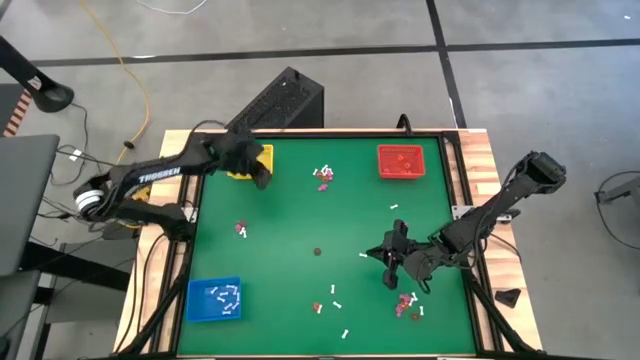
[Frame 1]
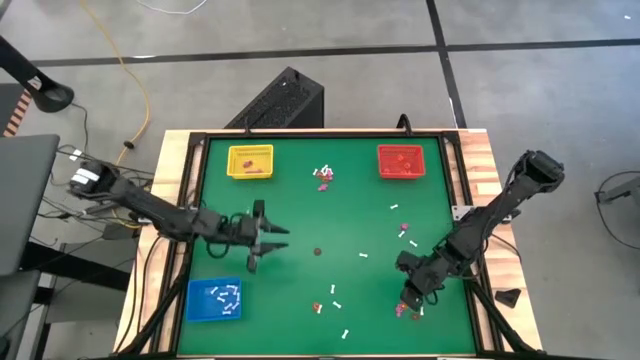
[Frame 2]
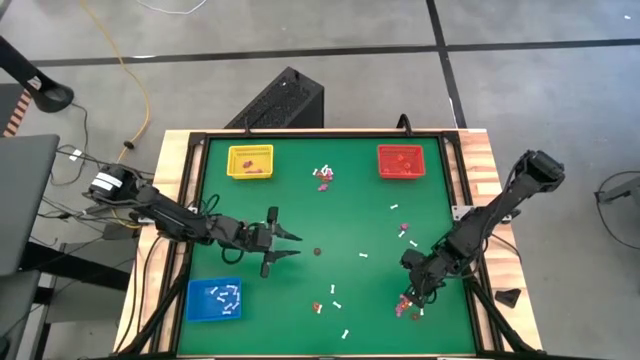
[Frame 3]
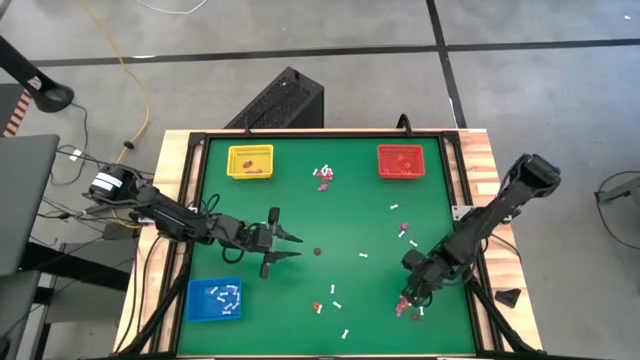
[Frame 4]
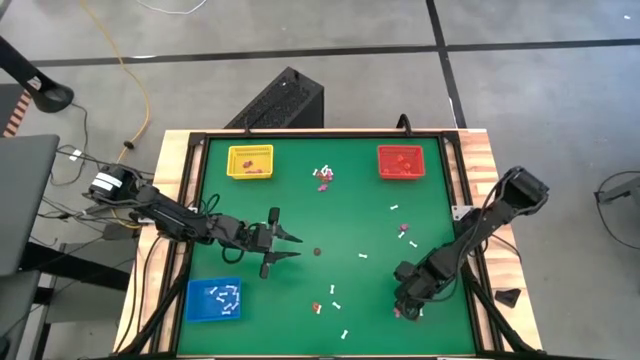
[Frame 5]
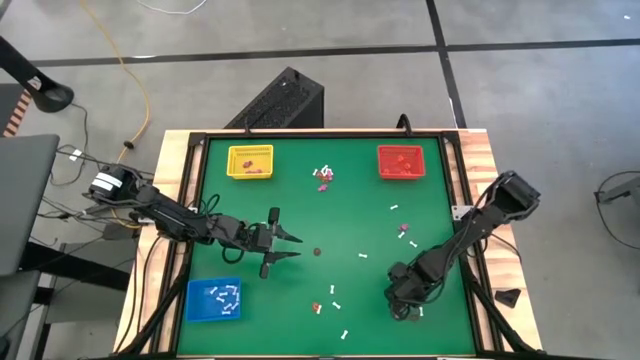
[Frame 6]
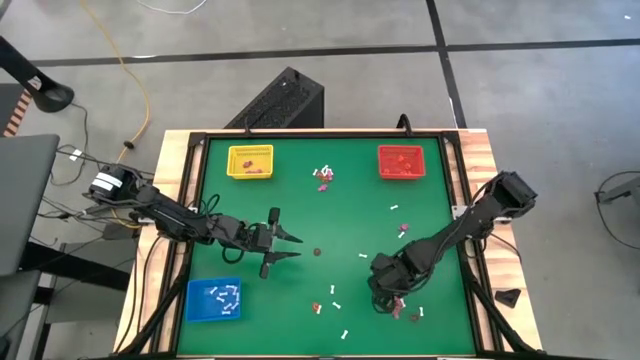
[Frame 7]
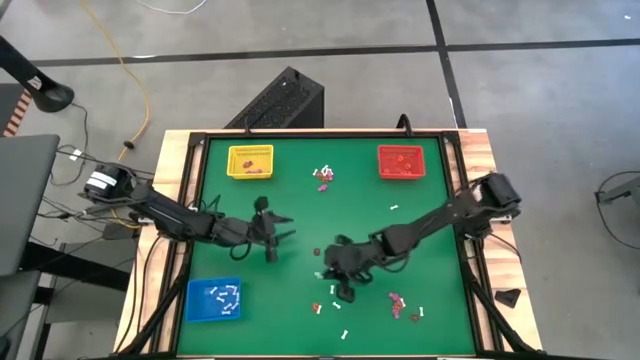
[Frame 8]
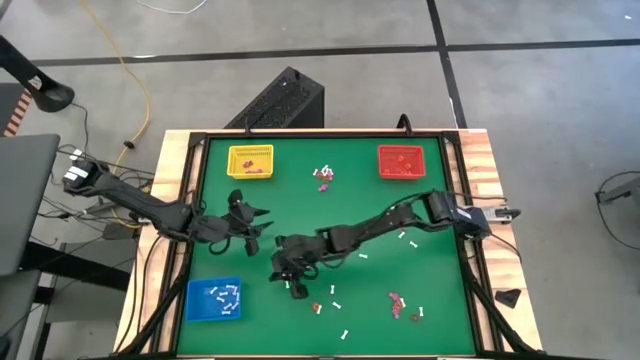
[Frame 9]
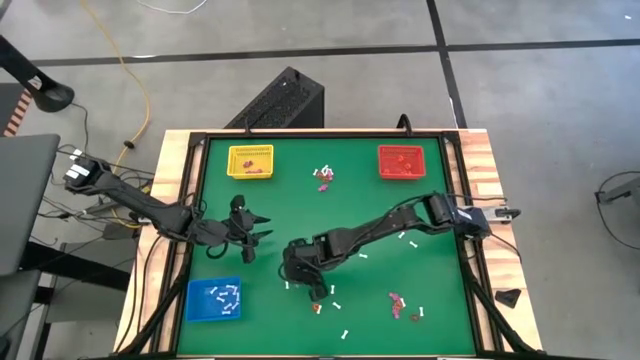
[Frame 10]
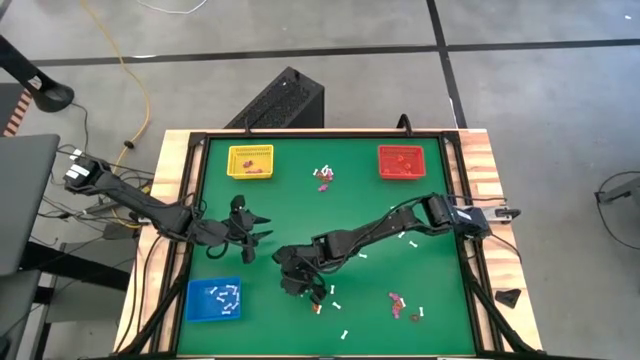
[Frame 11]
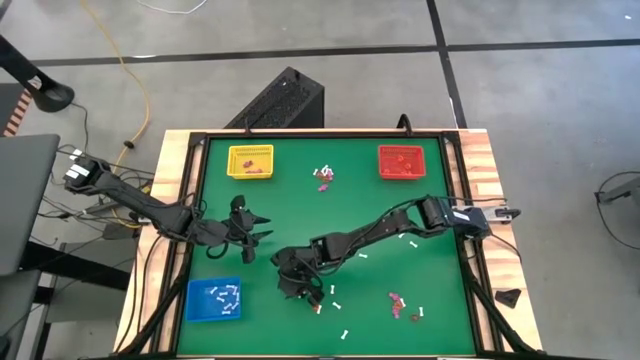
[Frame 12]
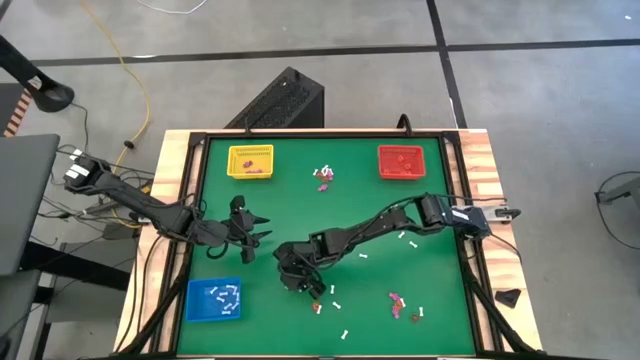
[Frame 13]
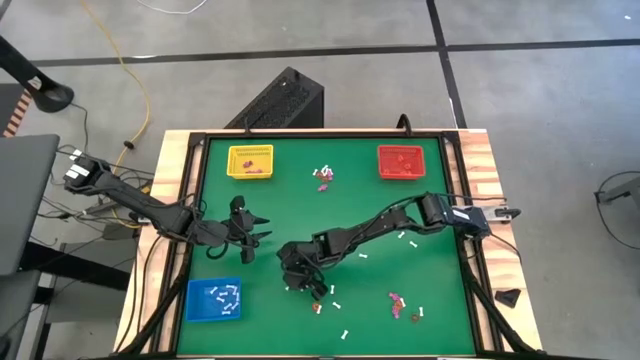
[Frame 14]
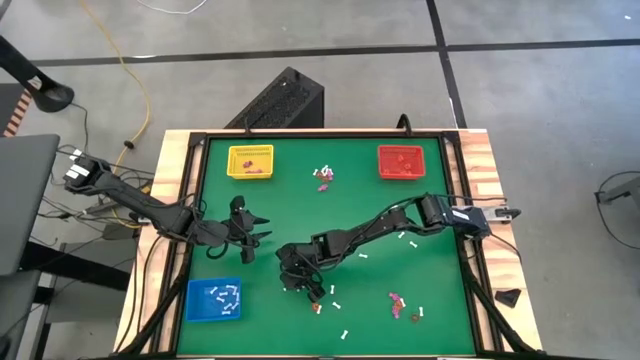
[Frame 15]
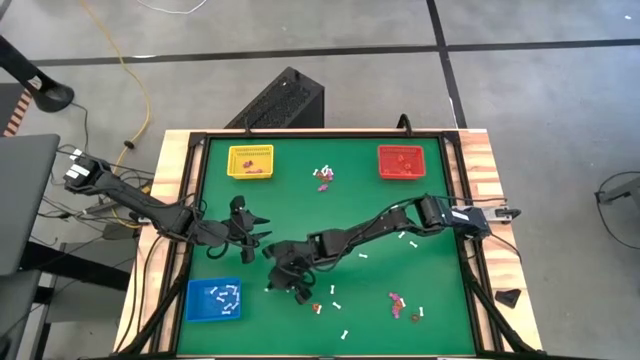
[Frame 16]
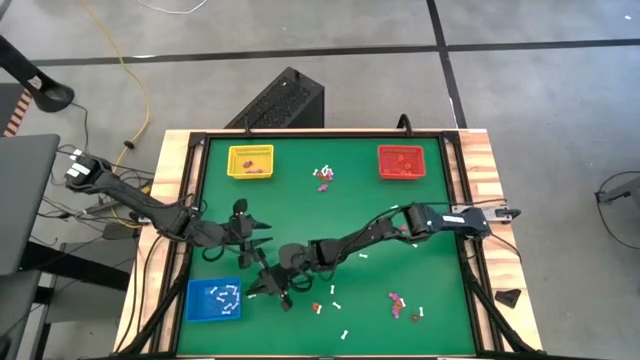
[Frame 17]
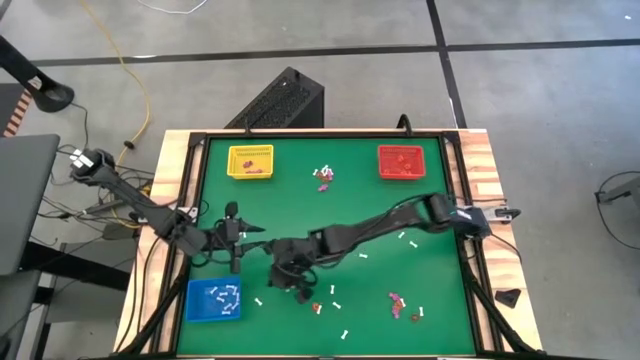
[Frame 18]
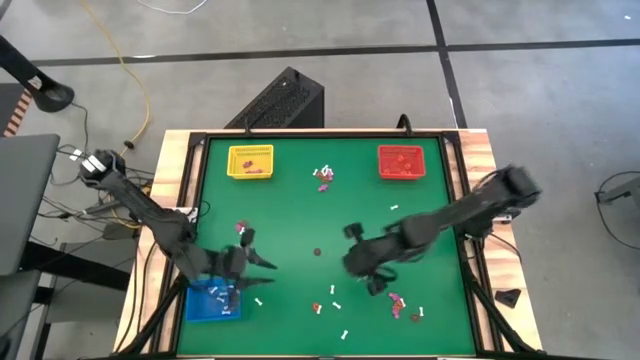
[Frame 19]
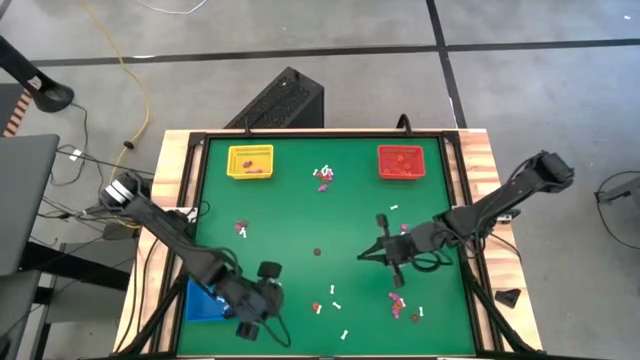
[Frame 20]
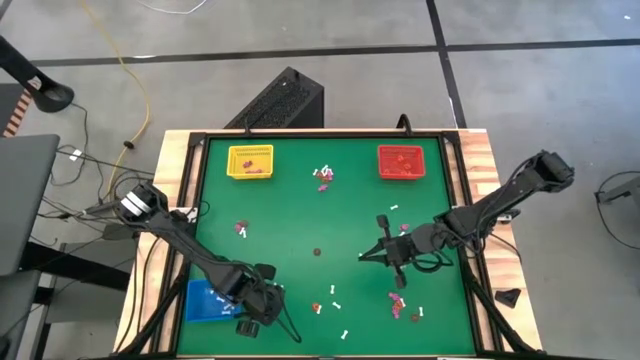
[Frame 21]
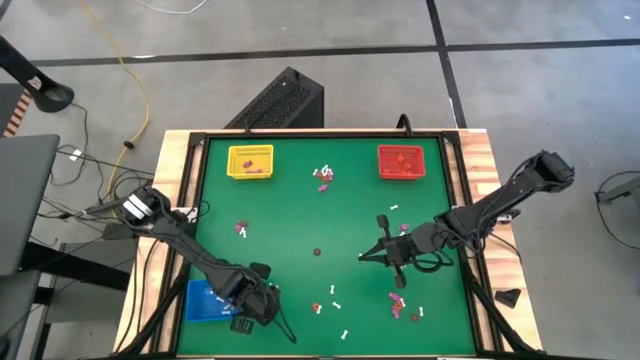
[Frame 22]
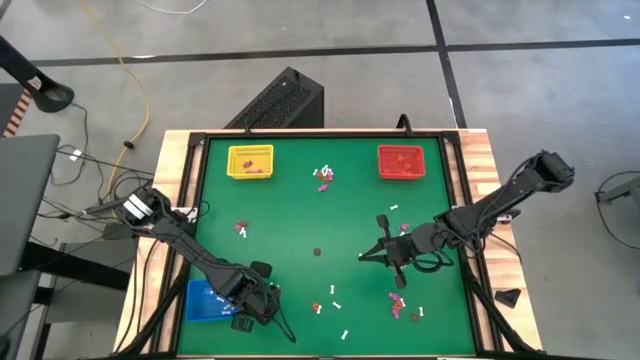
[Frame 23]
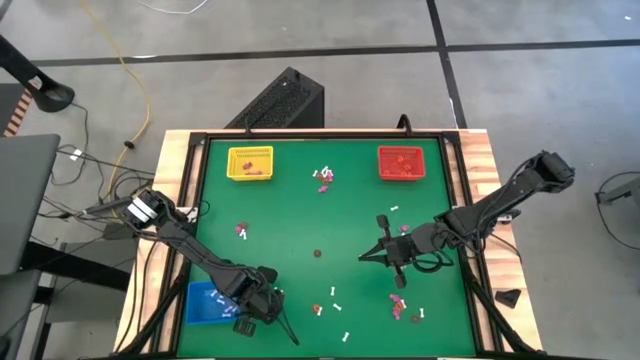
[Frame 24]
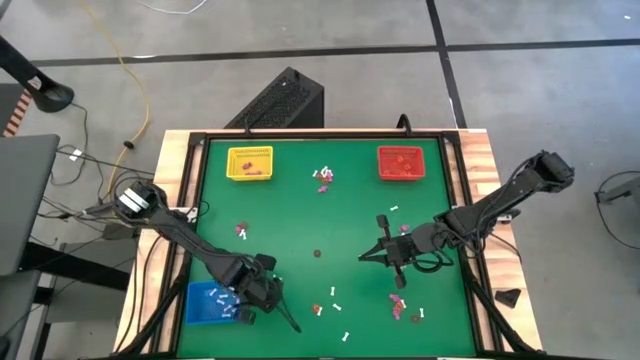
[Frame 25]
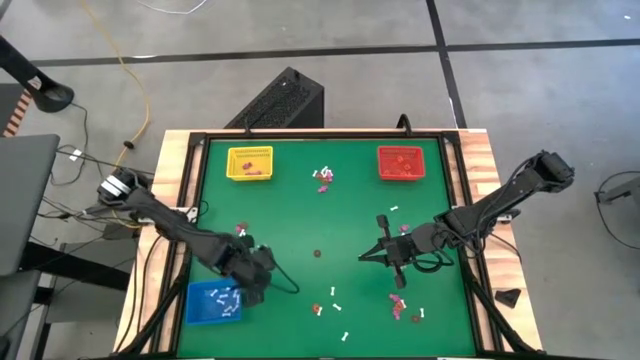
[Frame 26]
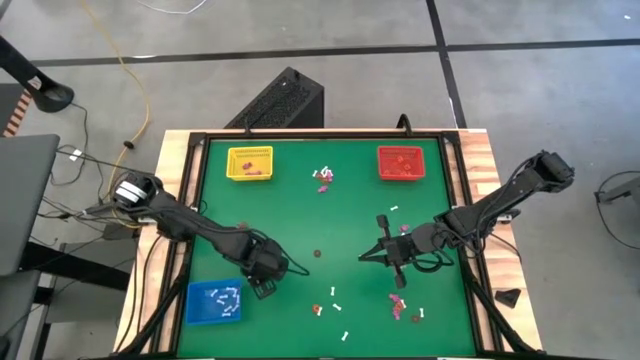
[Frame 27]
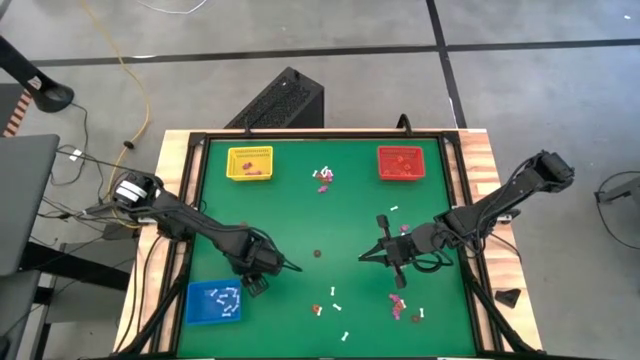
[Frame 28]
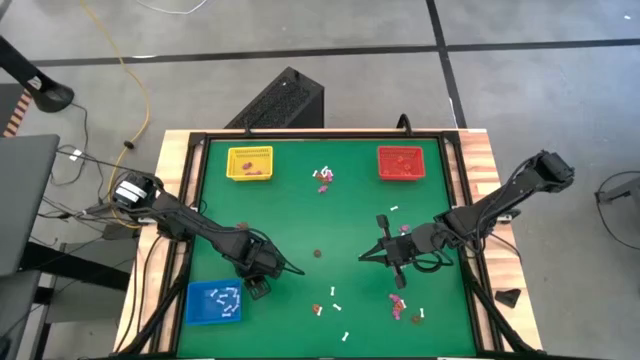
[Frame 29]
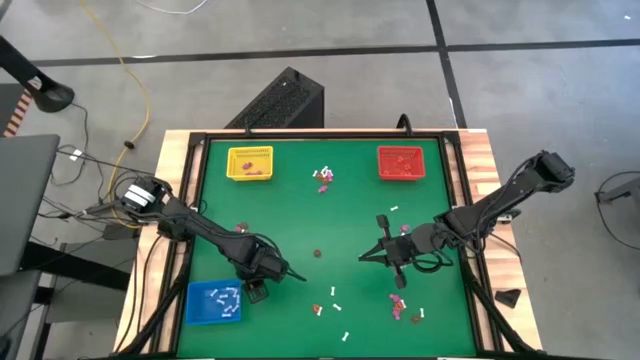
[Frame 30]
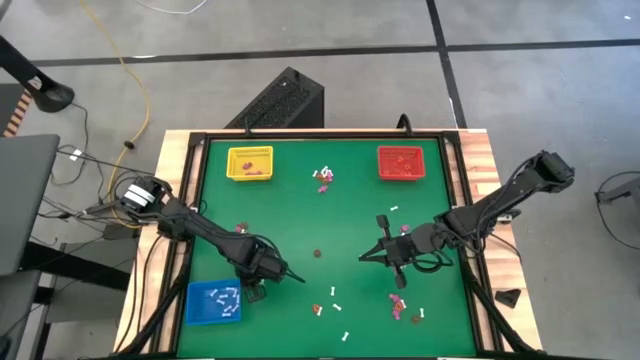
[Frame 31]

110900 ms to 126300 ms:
Task: Sort Halloween decoration
Put the white bone toy into the blue bin

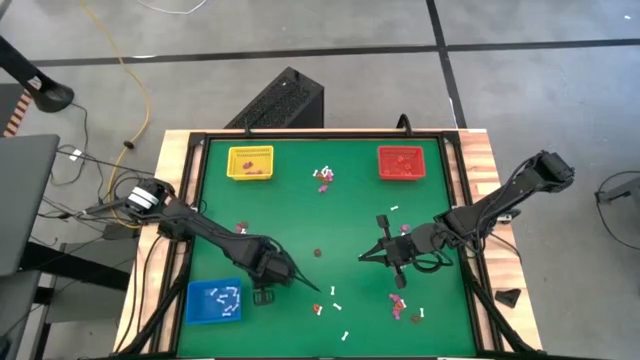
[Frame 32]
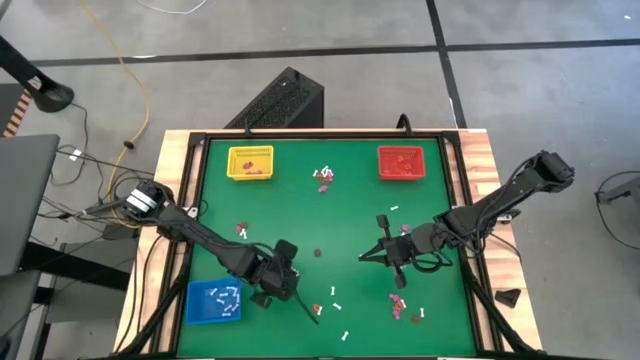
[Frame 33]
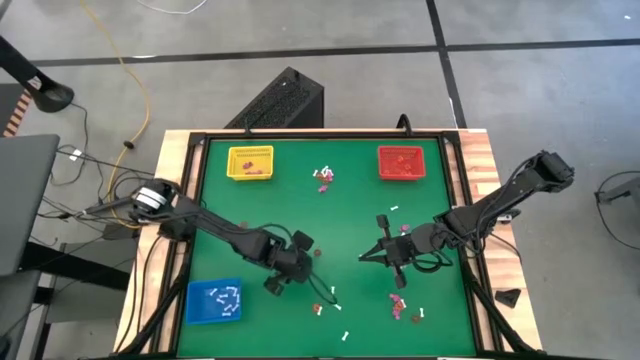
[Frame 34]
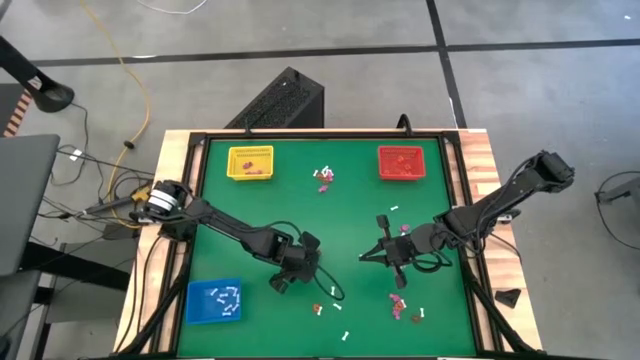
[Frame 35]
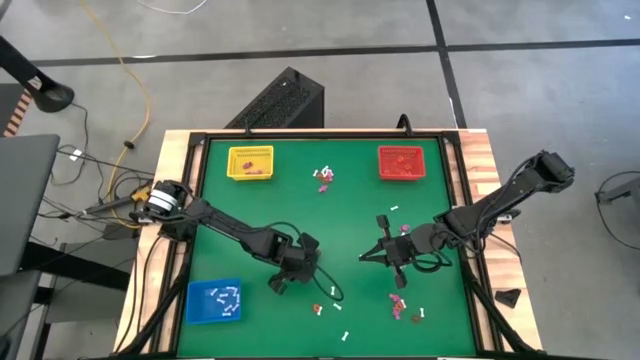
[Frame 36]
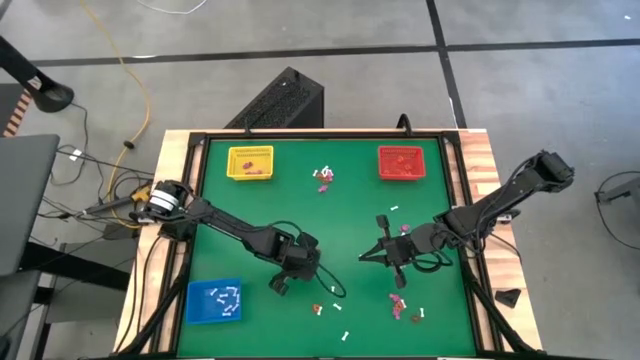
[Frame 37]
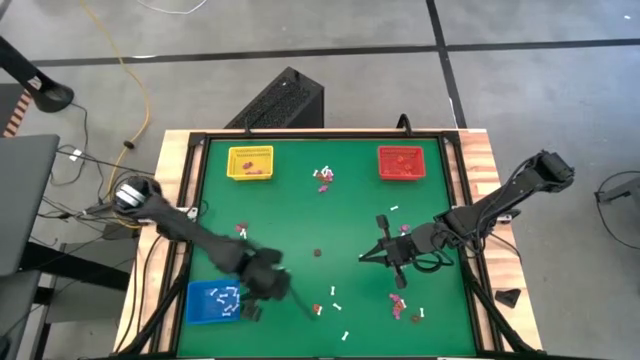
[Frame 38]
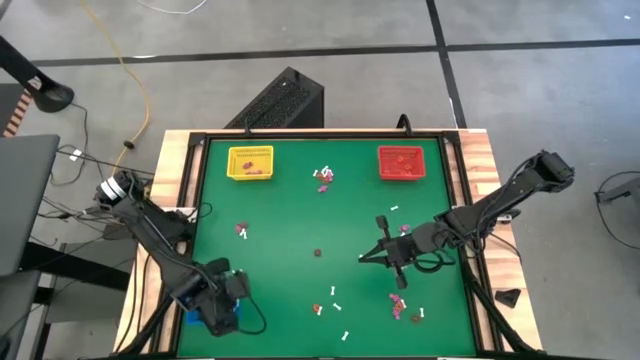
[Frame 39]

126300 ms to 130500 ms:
Put the white bone toy into the blue bin

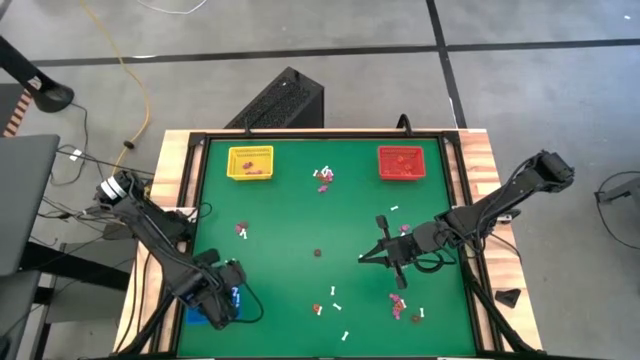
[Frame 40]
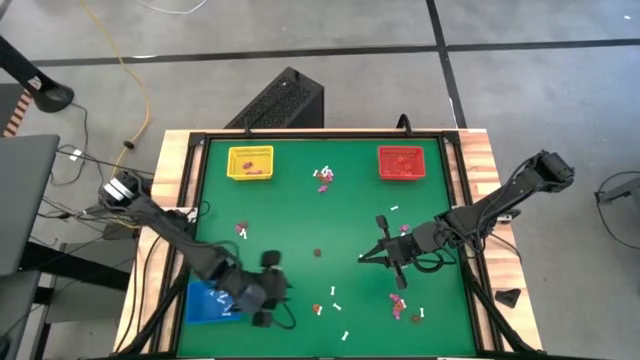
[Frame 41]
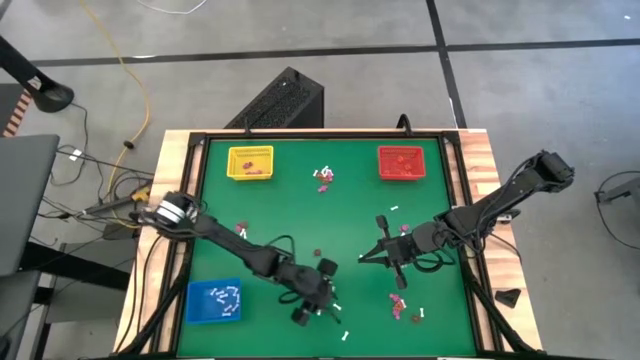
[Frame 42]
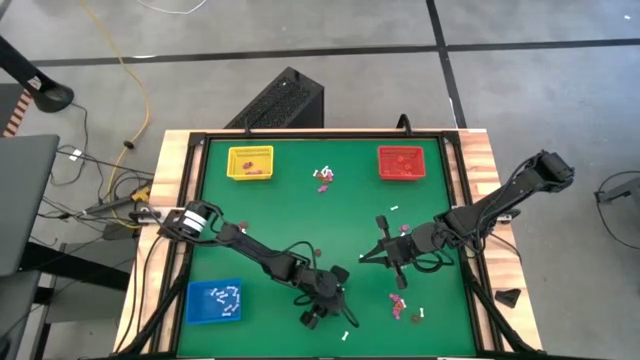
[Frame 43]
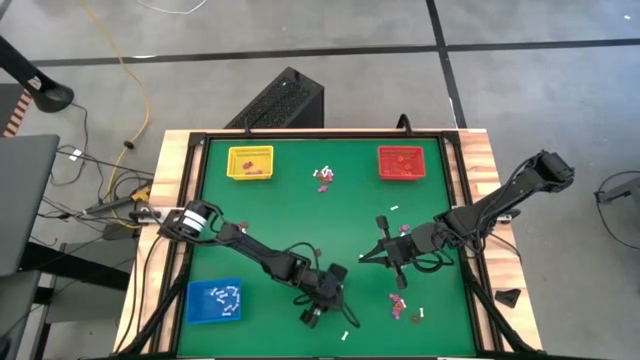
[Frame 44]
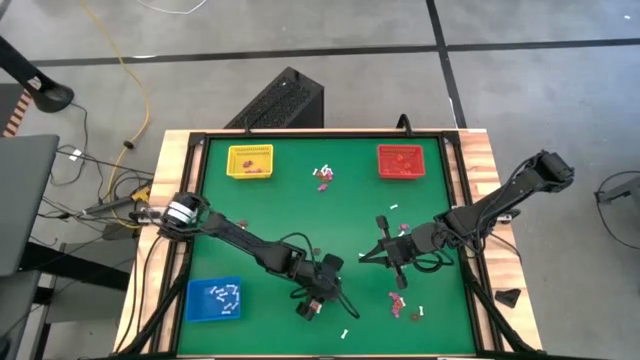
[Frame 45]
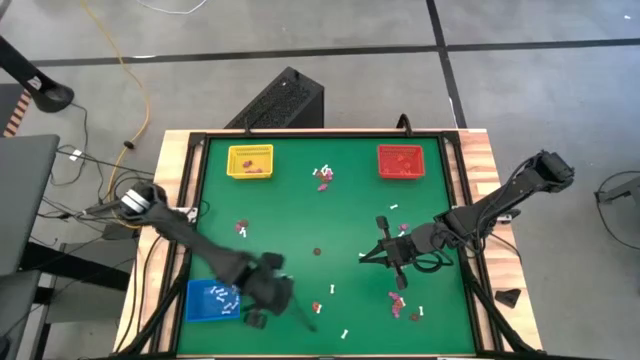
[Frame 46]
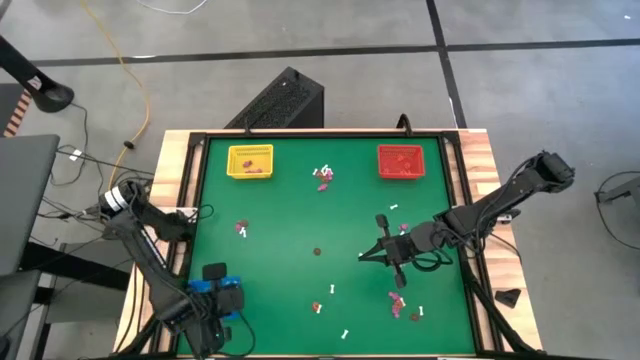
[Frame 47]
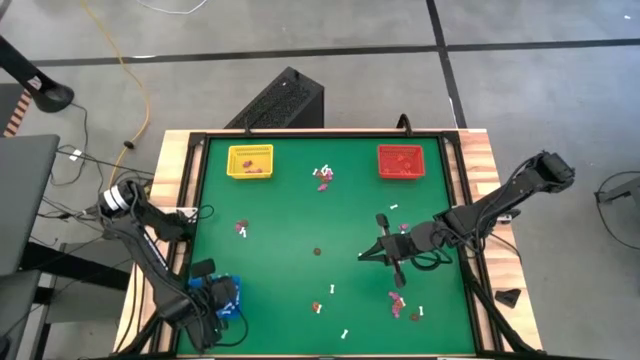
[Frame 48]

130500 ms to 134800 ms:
Put the white bone toy into the blue bin
